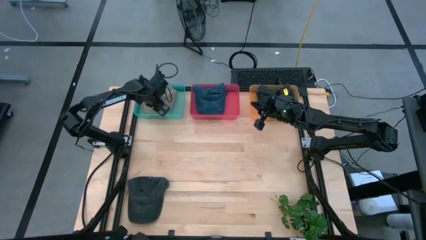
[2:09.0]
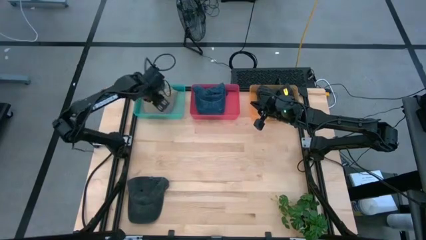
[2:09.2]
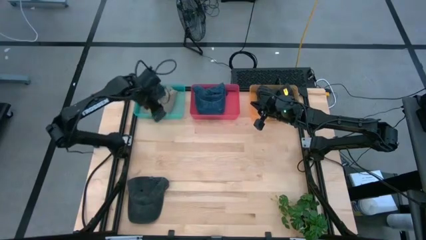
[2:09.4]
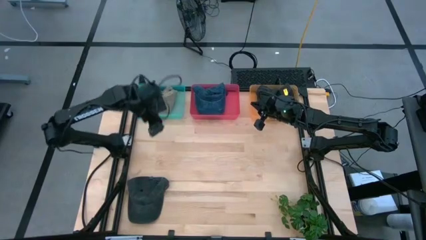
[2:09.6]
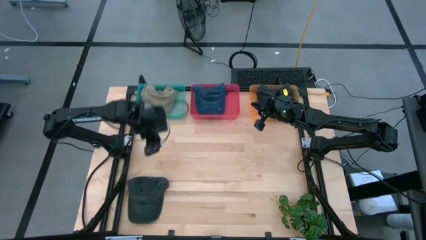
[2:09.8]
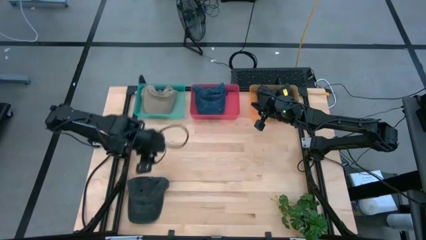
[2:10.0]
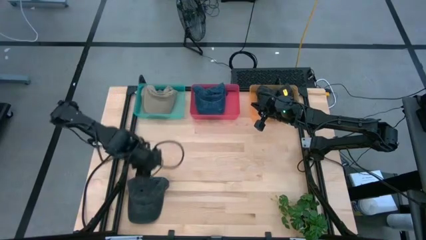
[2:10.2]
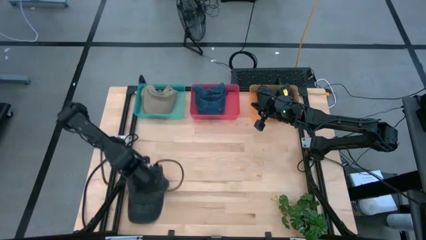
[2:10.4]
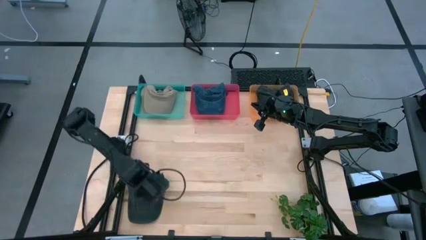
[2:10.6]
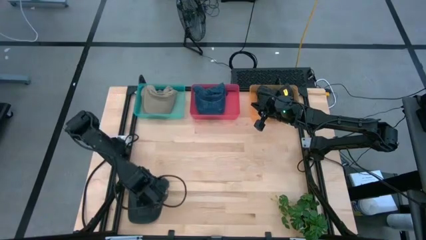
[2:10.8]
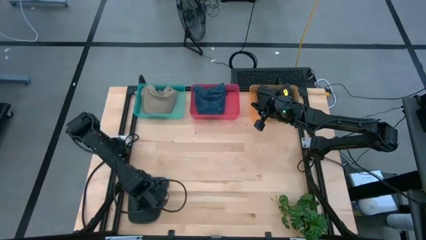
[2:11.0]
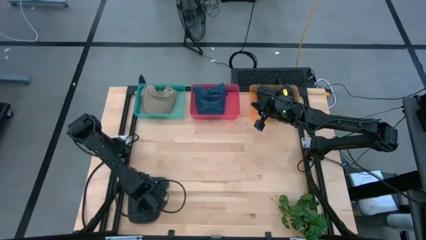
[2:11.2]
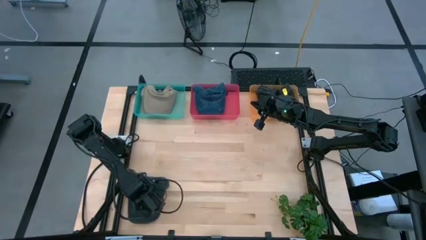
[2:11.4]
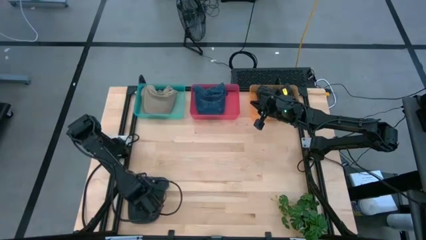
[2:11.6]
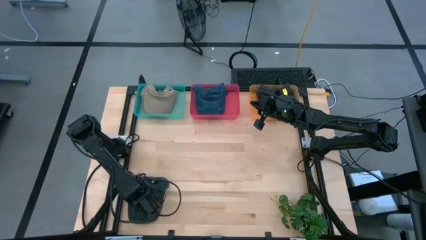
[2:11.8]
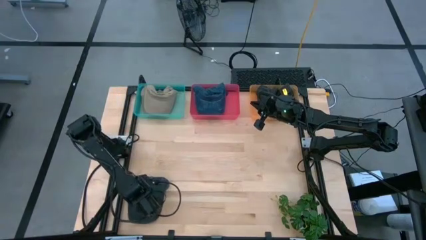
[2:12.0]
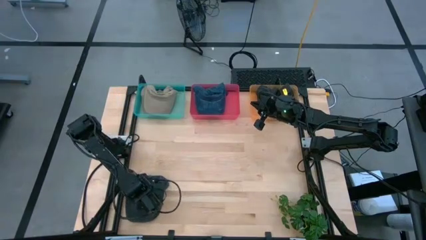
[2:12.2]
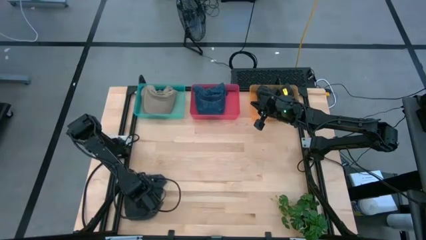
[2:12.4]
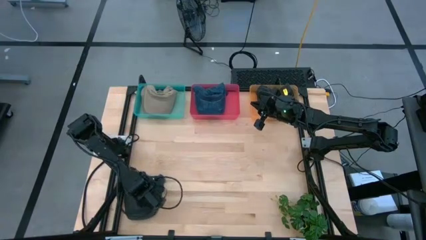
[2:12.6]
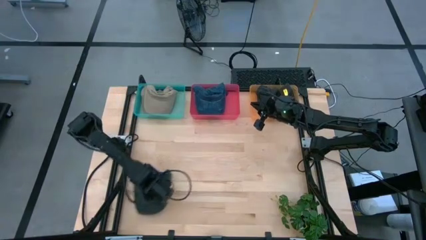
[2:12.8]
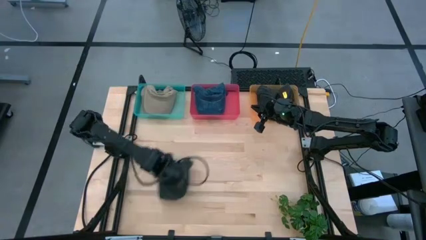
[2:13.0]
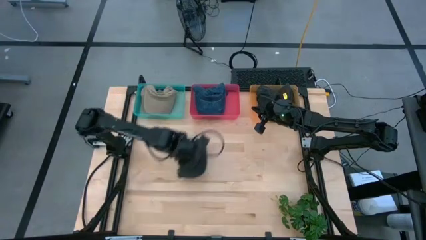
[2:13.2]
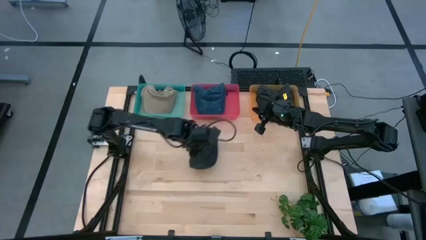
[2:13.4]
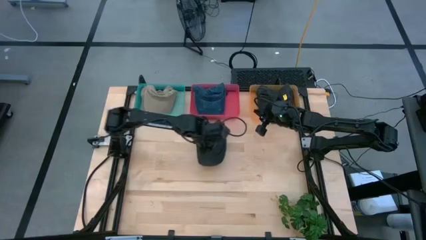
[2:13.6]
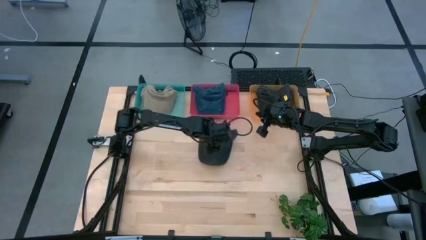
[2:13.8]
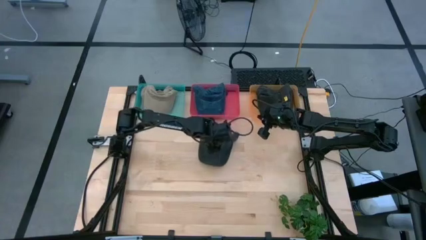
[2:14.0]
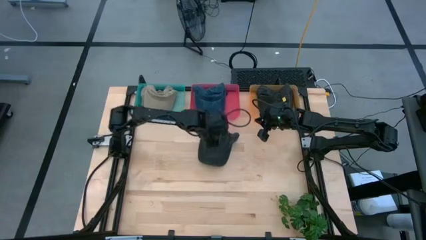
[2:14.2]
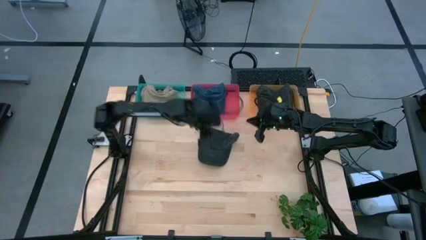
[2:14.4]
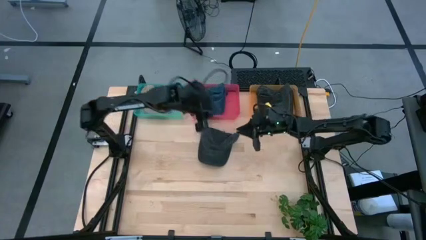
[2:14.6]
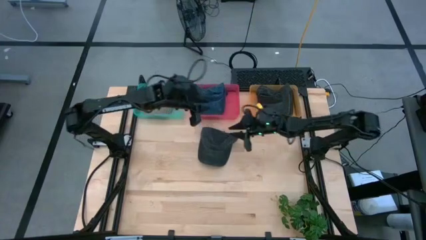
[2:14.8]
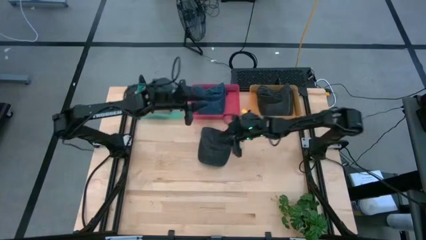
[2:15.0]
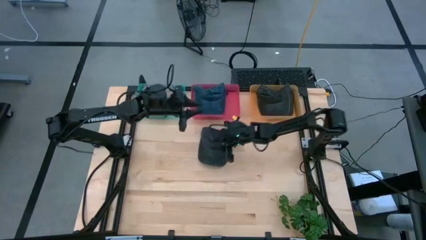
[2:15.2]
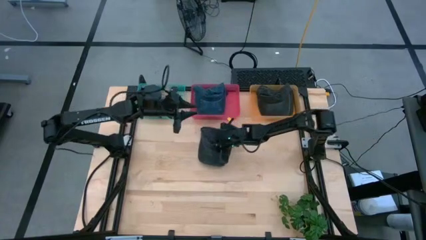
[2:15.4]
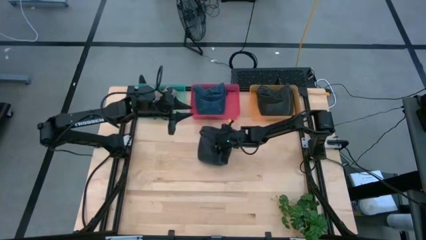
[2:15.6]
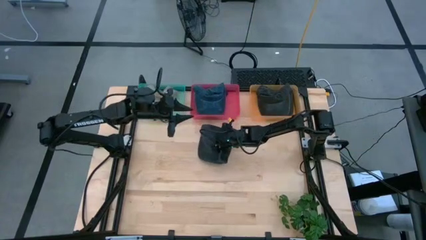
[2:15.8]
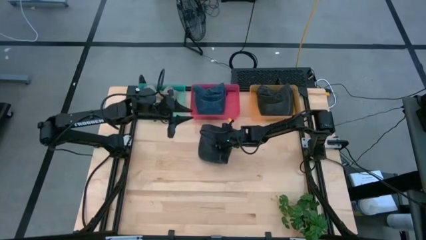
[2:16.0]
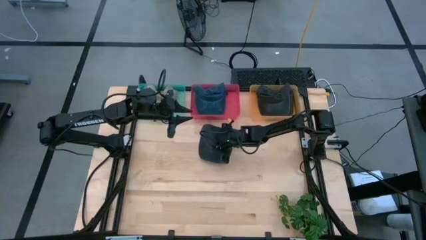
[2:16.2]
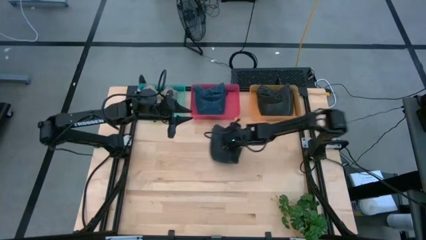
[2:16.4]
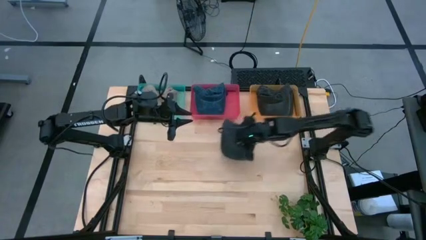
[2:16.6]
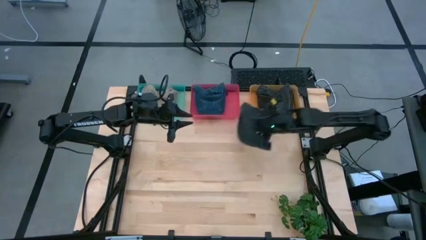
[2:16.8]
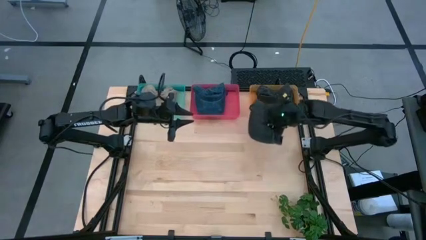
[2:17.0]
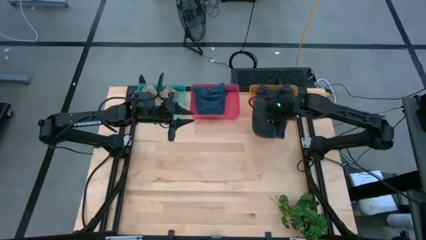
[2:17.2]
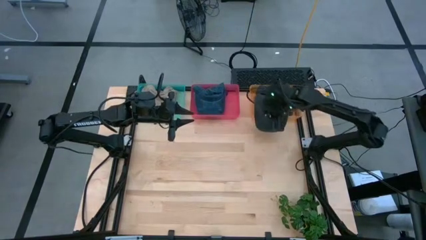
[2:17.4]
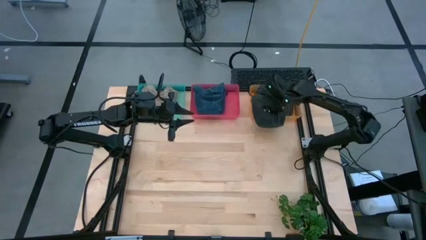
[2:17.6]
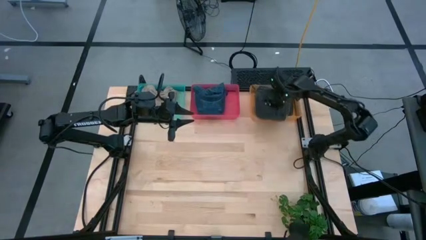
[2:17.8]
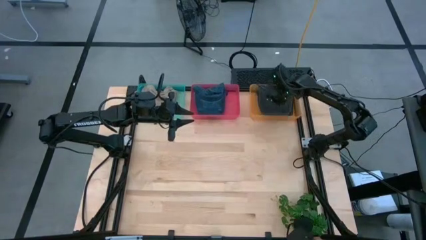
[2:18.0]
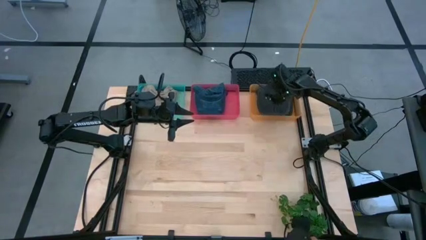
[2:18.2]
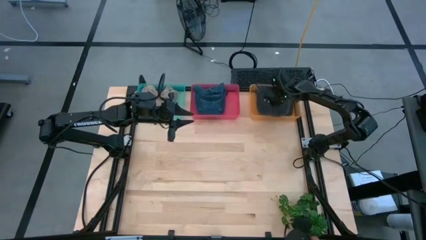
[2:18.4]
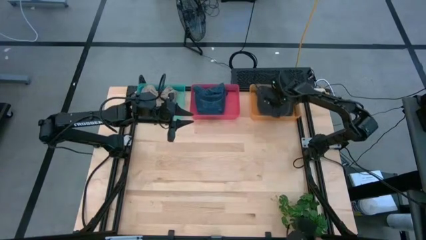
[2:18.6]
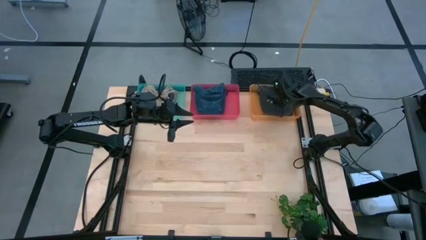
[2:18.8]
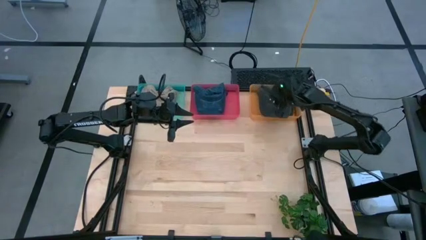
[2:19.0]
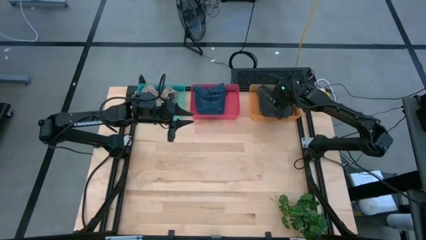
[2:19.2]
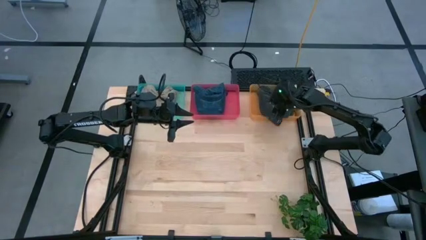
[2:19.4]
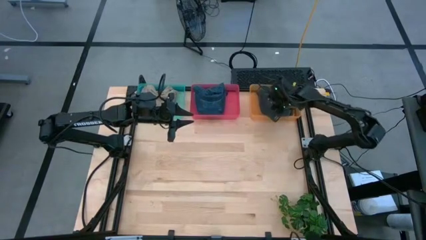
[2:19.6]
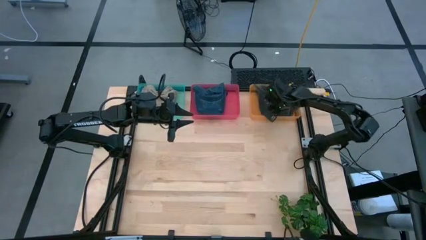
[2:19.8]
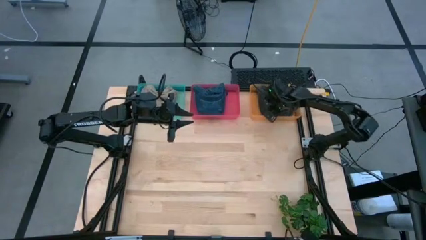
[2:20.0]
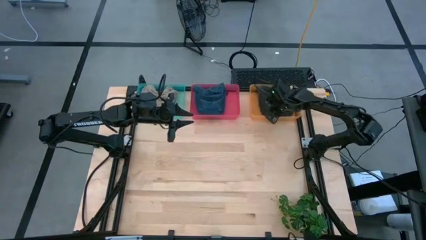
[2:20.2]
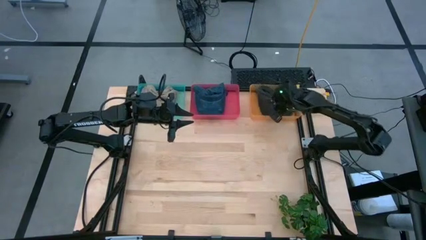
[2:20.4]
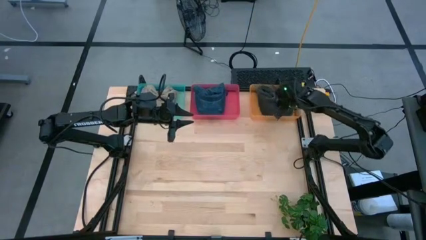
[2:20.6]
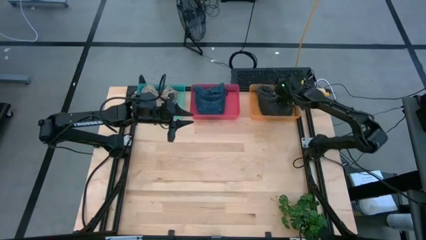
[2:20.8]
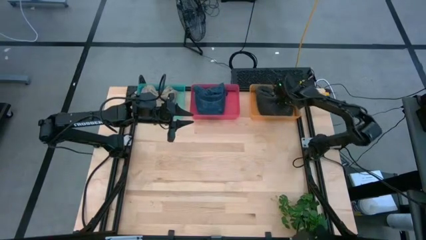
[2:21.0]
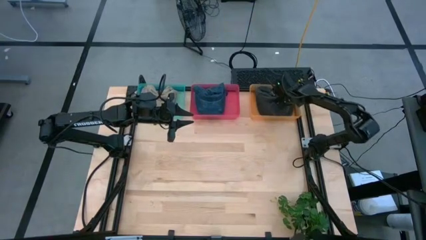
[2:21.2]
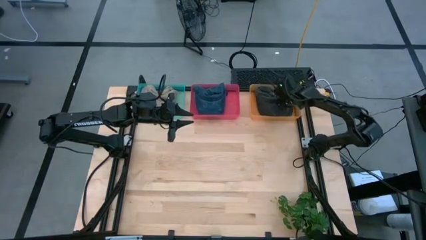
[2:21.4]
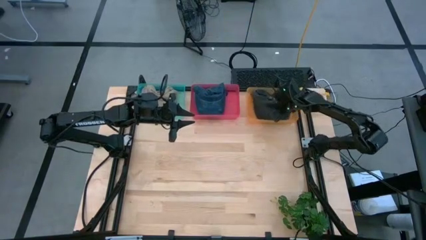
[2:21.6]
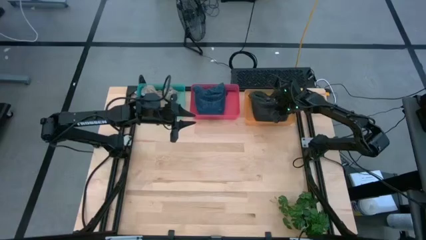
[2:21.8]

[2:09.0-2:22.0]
Task: Pick & Place hat
Put the black cap into the orange bin

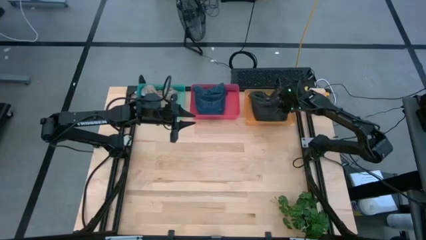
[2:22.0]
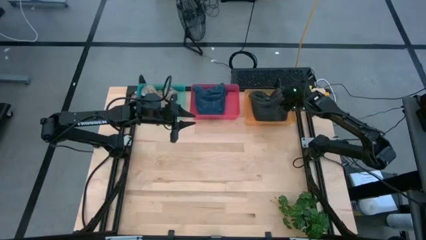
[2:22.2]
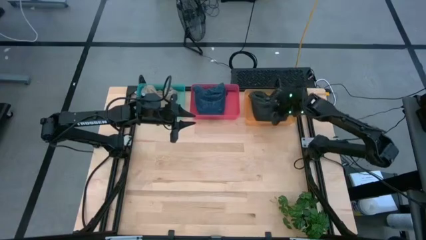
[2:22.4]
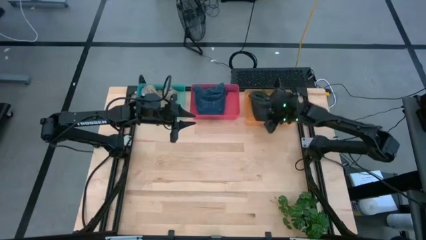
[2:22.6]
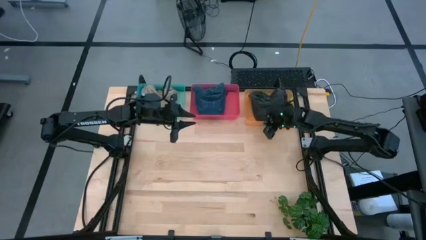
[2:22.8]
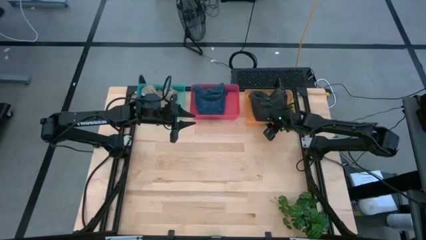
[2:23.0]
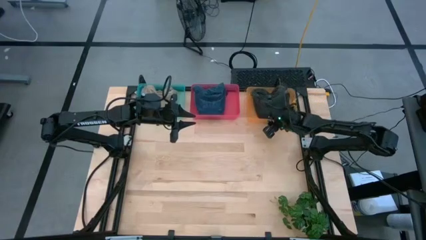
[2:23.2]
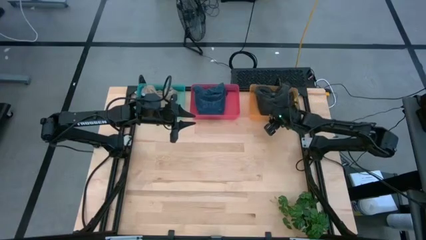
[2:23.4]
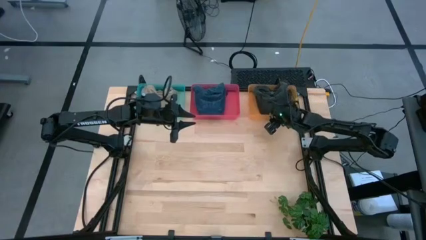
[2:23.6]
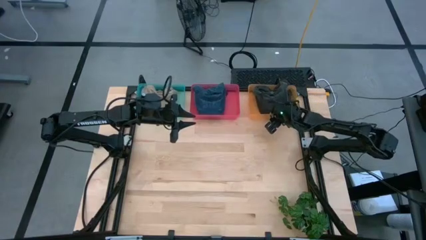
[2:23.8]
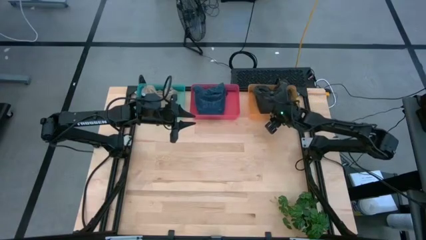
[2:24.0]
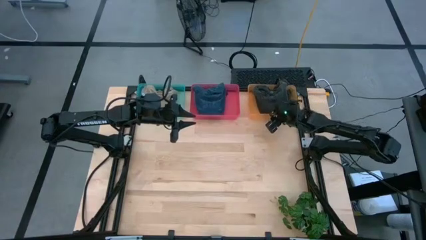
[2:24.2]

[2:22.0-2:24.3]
Adjust the orange bin

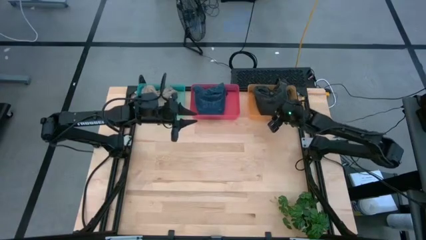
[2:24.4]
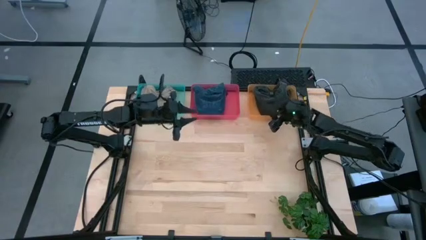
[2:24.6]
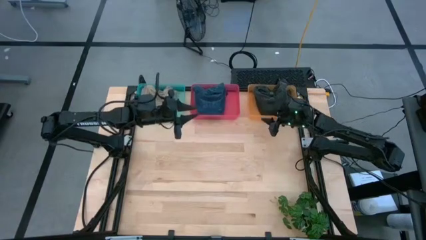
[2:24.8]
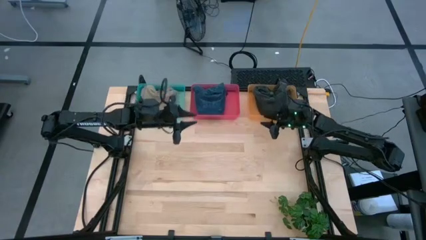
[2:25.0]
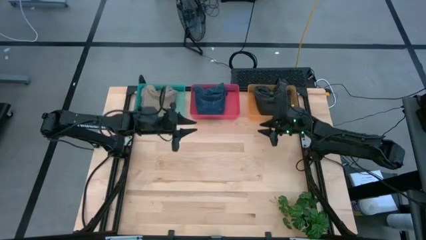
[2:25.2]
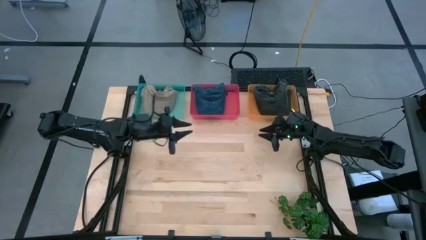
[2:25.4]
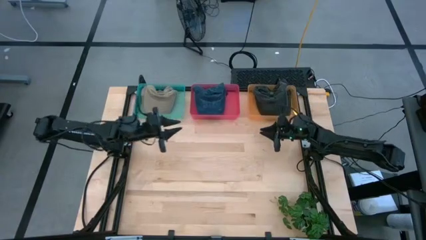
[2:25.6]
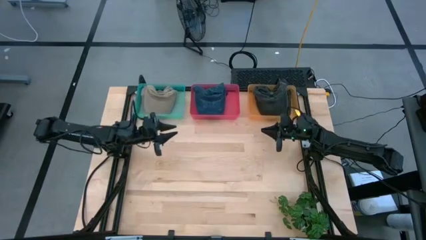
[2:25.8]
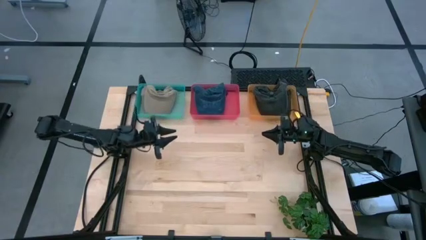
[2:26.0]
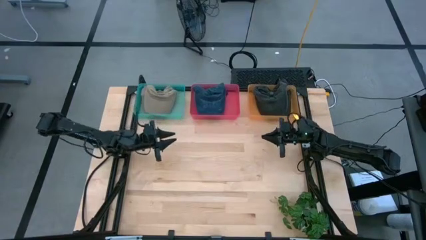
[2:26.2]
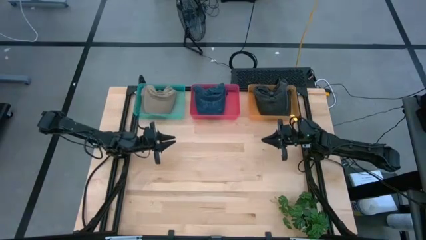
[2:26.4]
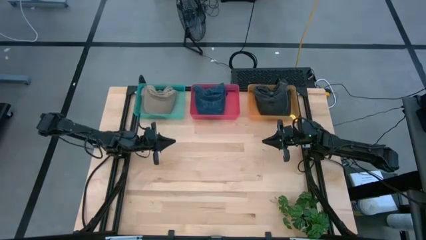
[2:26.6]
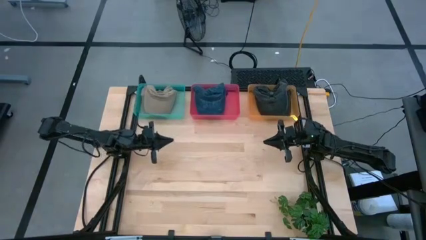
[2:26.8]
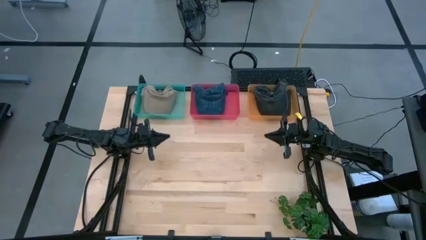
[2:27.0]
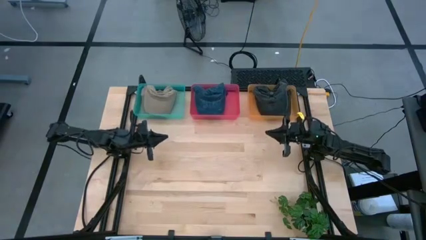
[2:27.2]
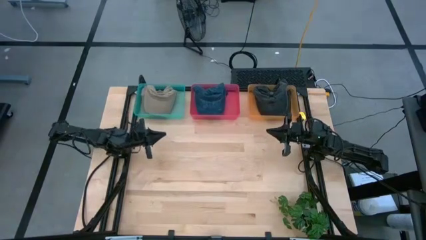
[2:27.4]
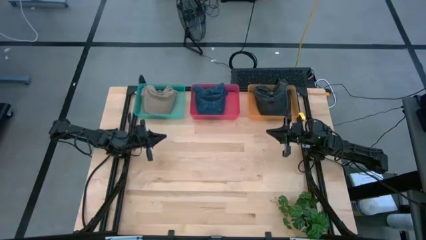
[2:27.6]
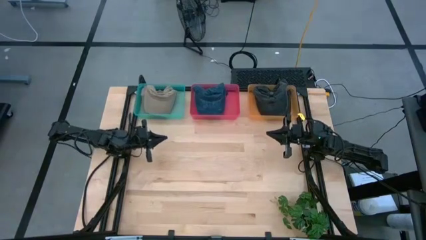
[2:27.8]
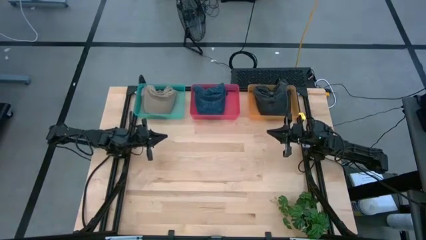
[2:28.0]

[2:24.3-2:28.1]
Return to Home Position
